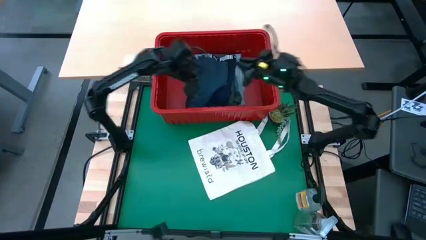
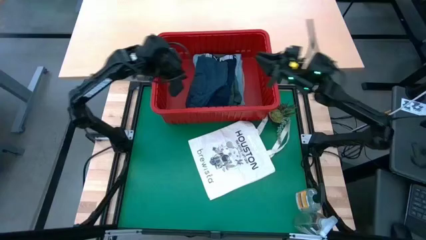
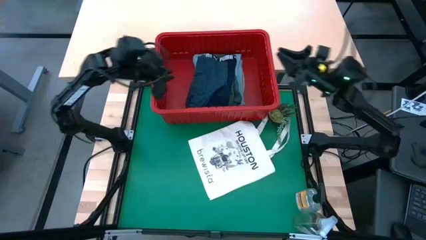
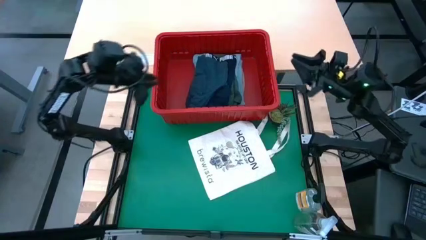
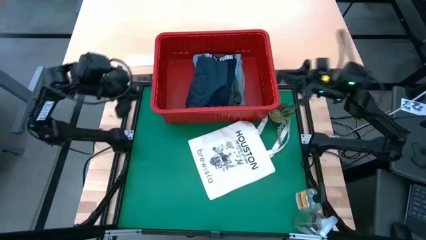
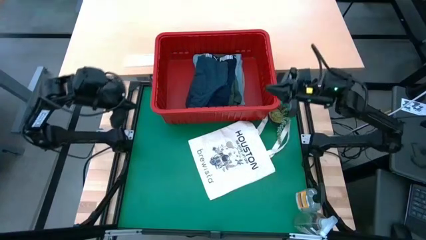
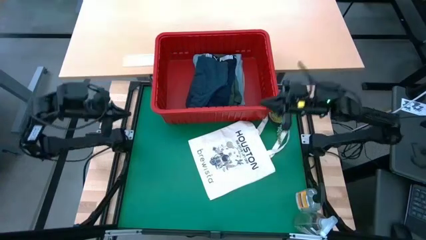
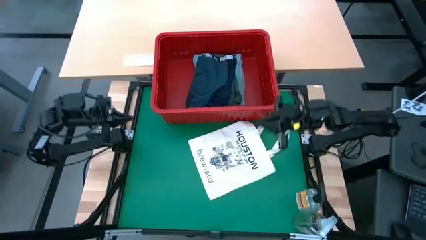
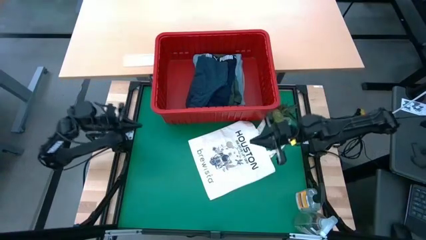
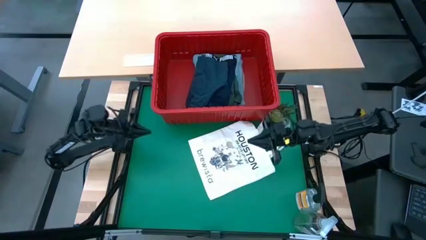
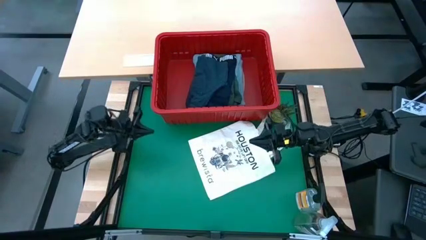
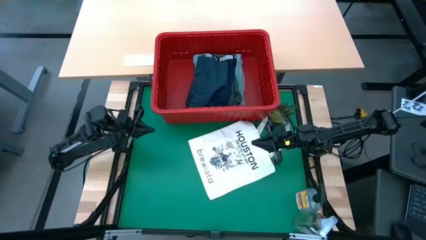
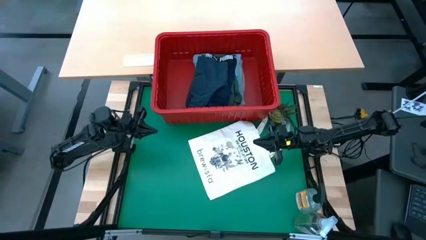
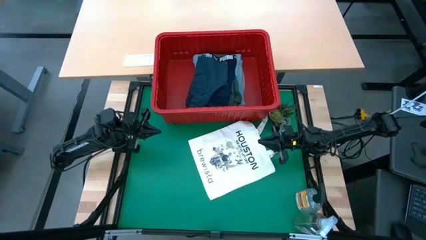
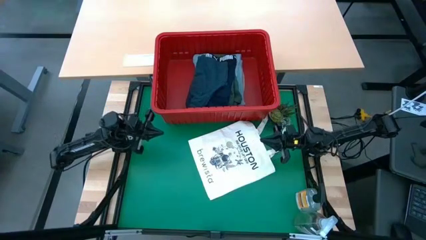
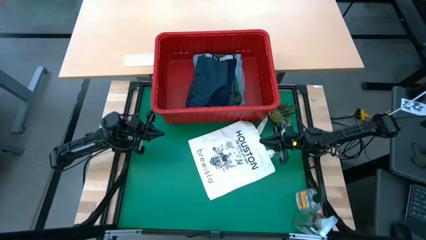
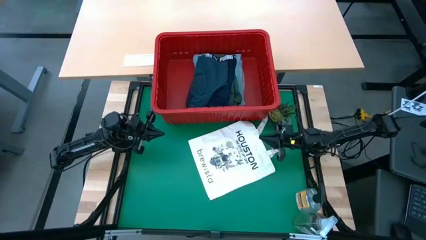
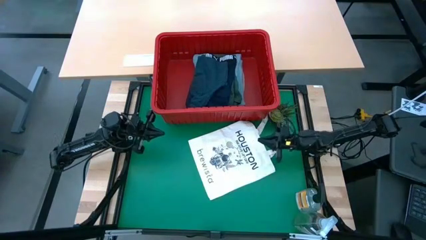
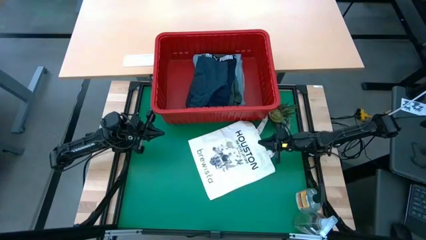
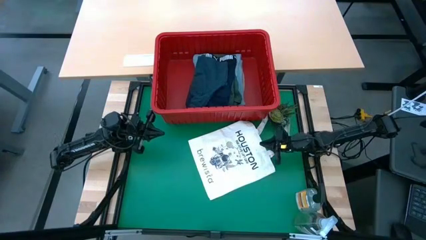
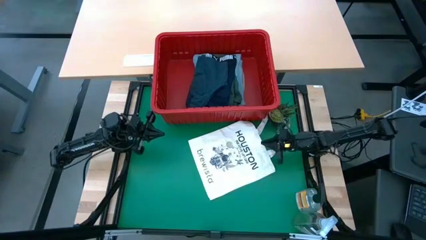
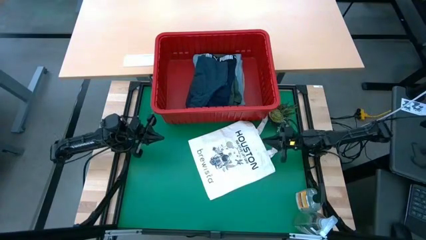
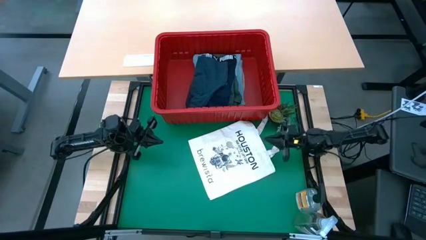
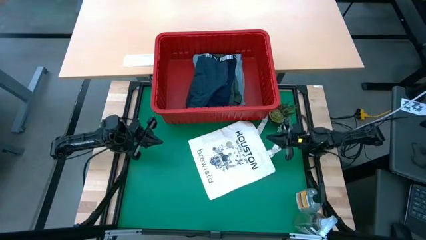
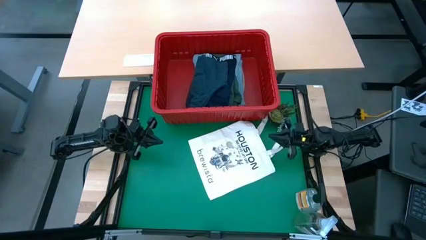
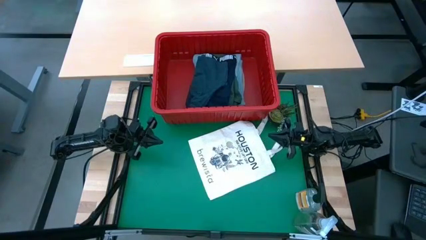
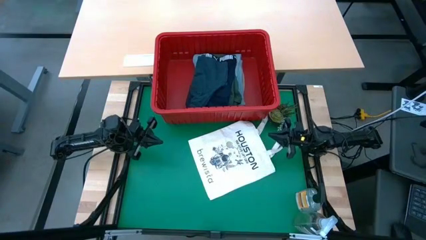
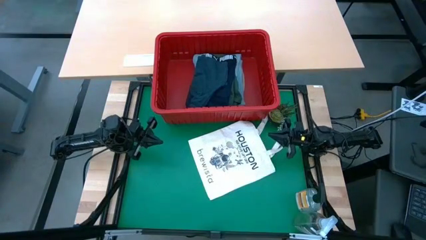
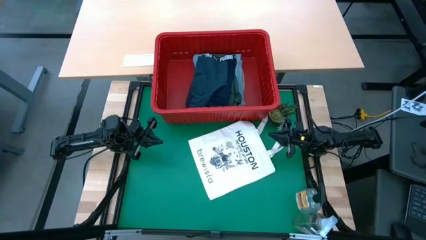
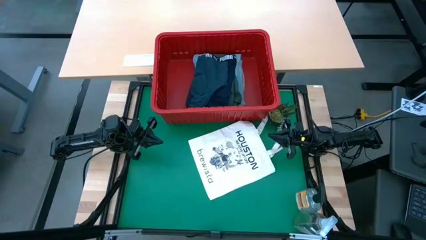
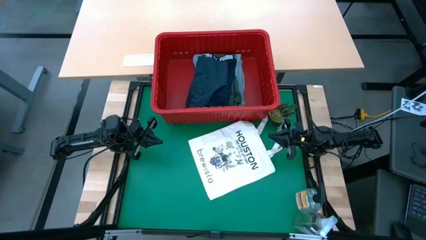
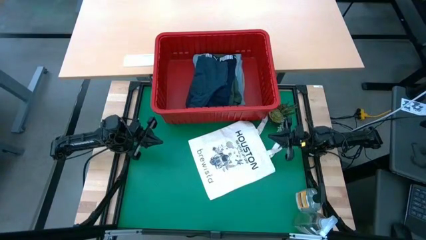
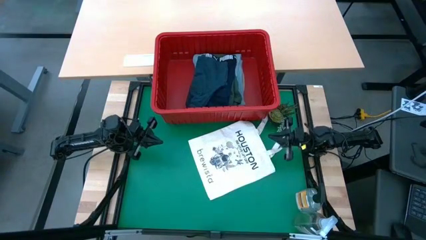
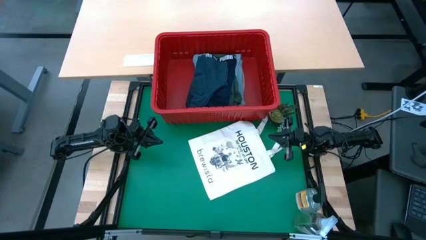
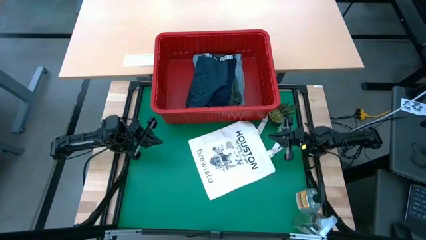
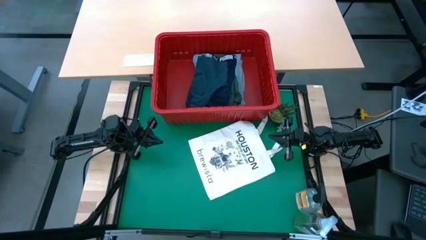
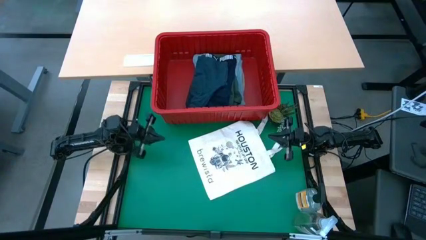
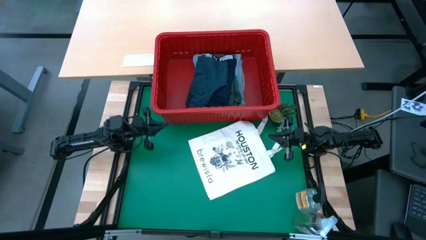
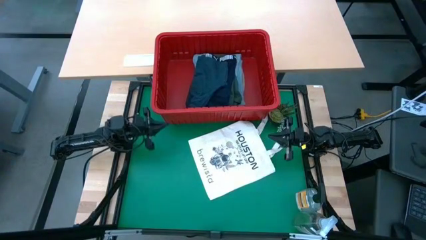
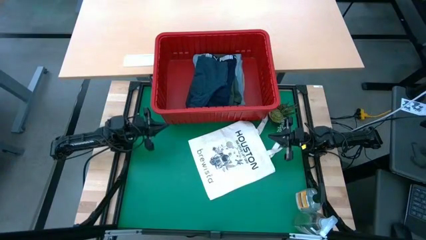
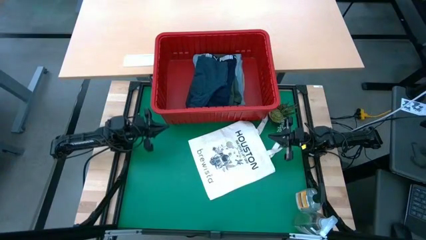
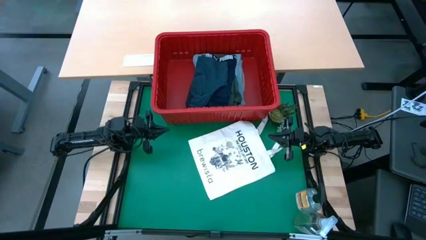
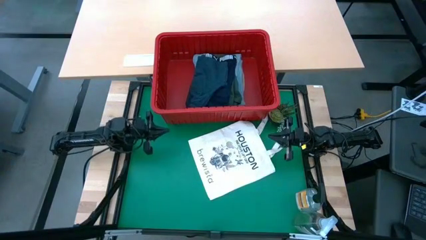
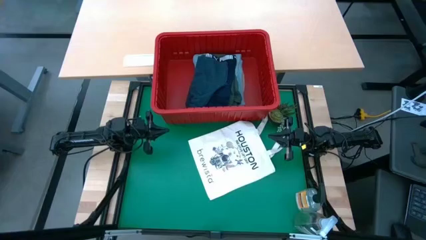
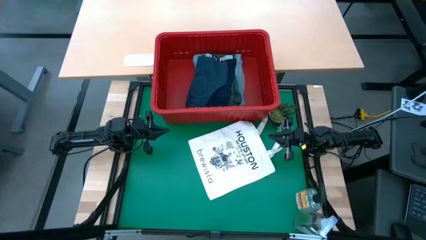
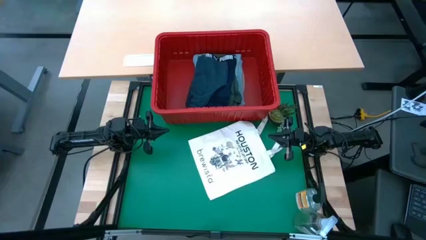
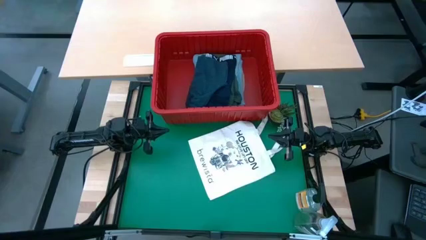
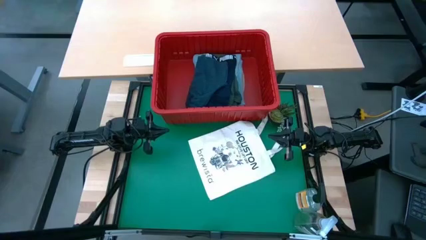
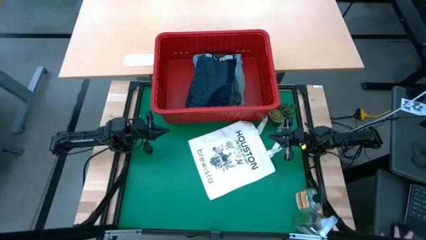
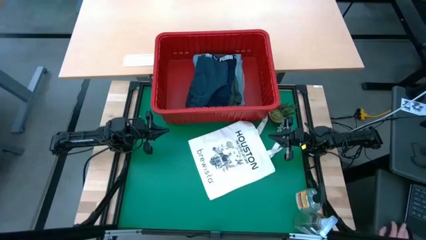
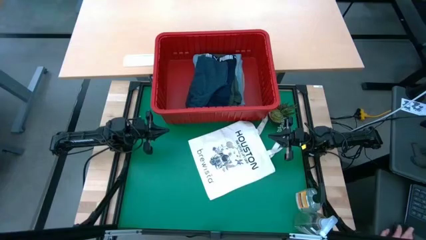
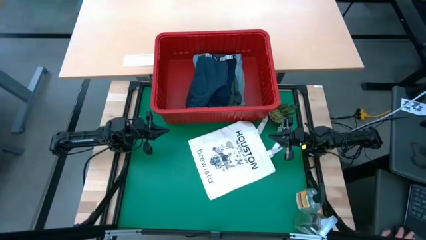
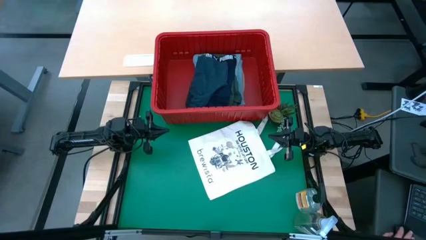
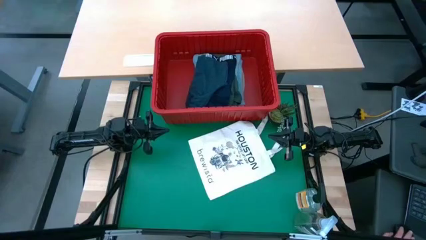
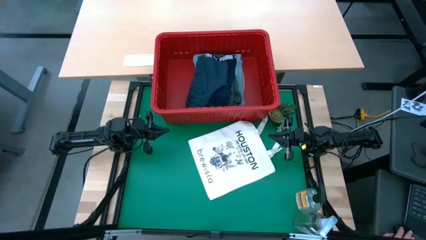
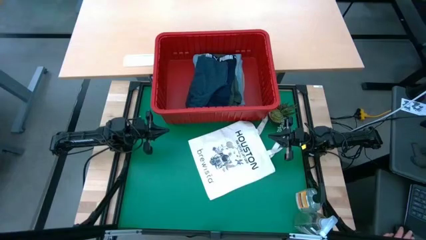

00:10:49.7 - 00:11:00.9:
Task: Fold Laundry from Bin
Return to home position

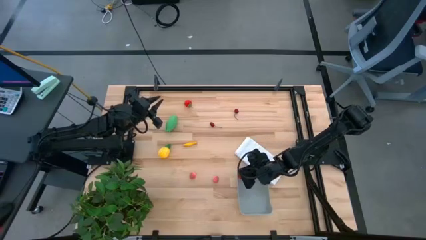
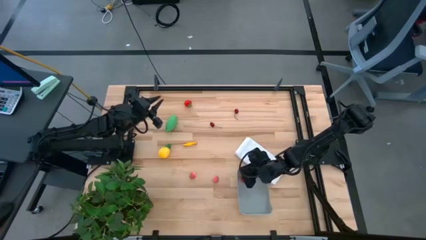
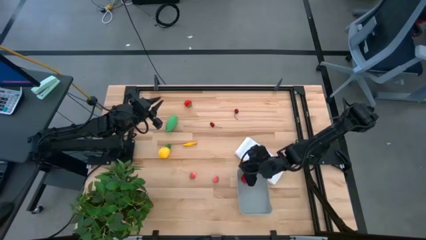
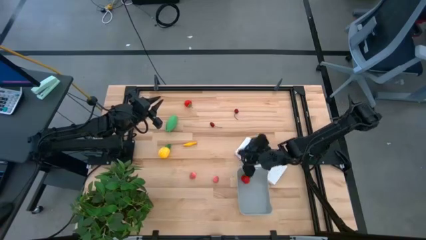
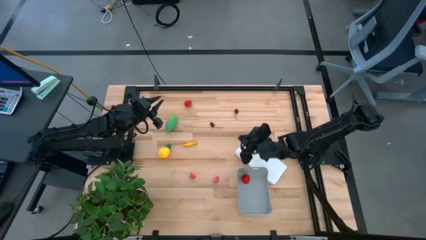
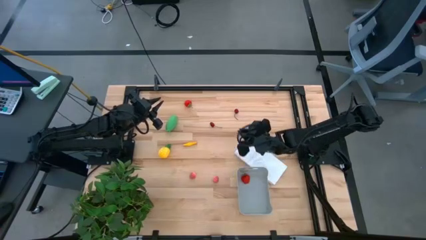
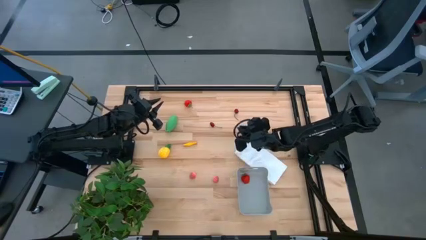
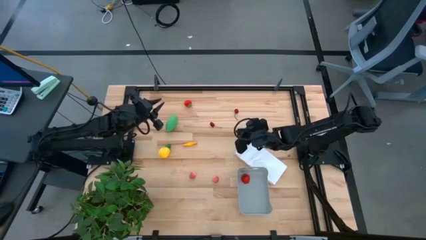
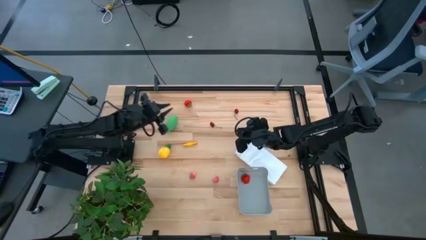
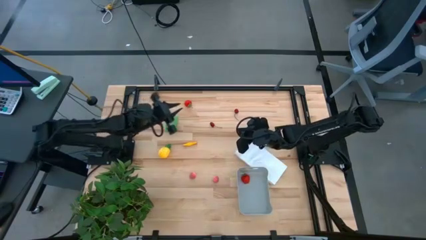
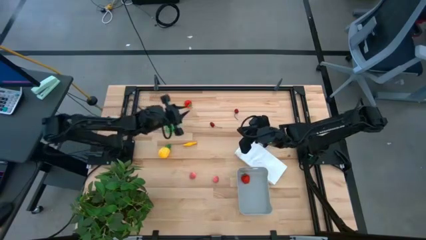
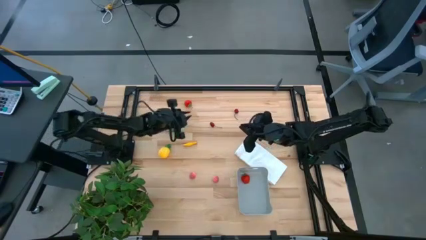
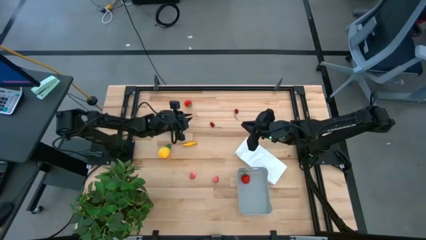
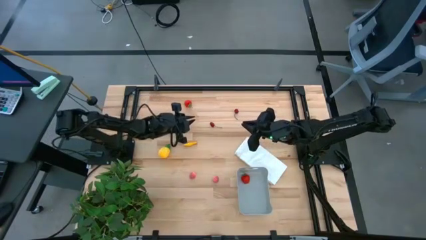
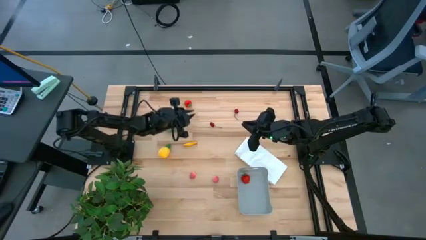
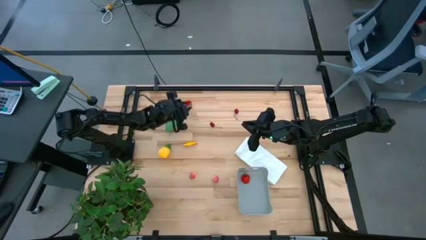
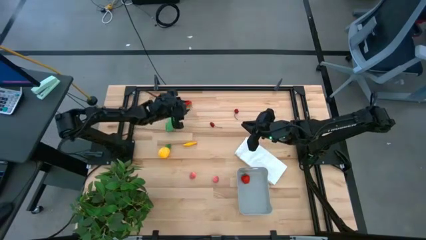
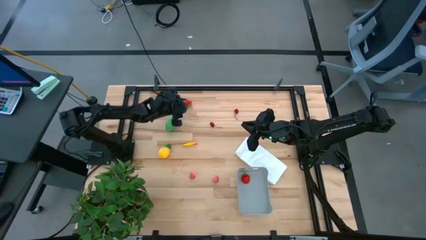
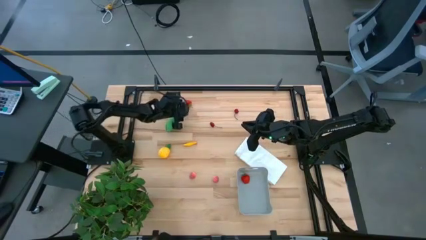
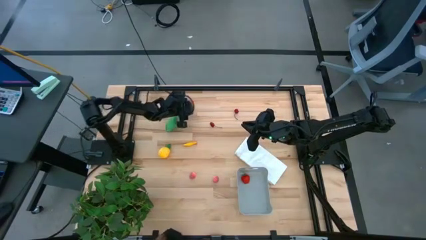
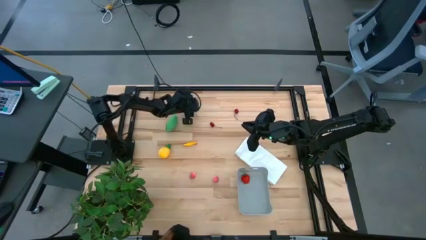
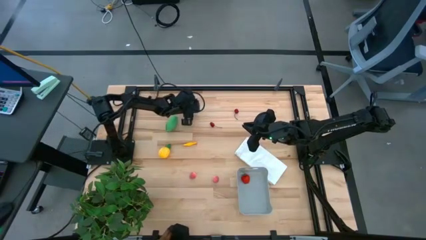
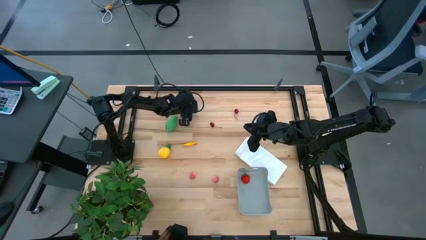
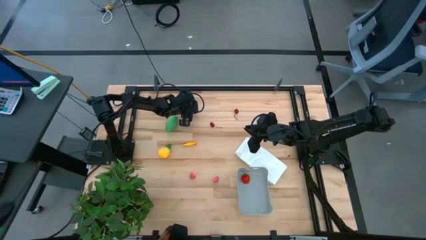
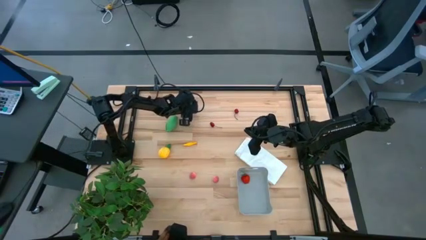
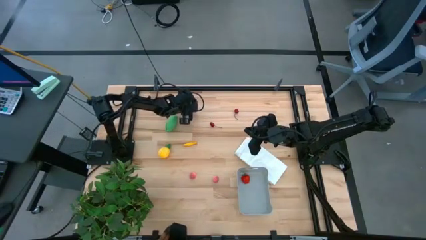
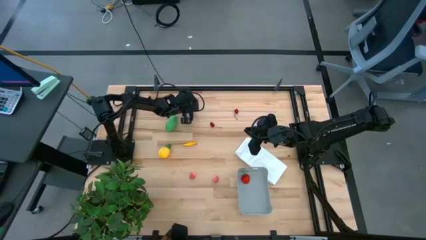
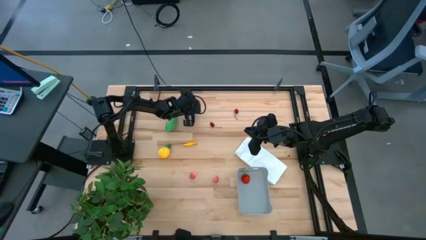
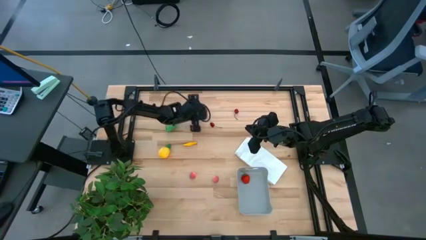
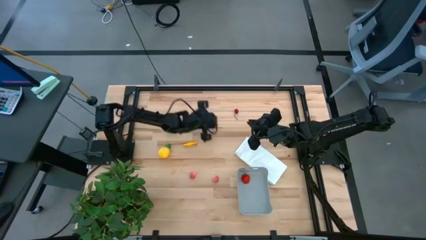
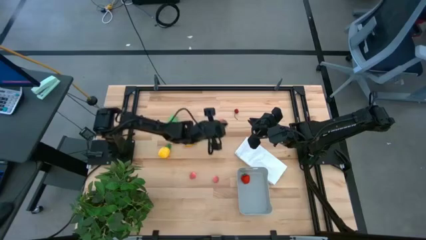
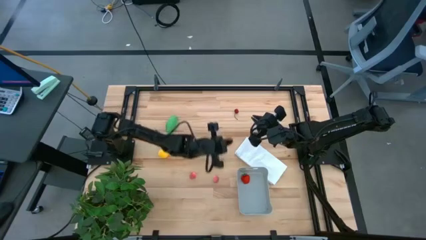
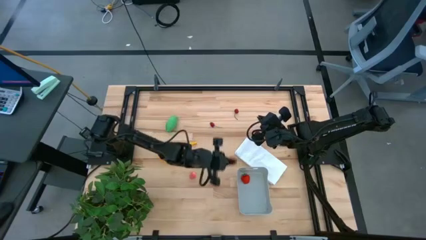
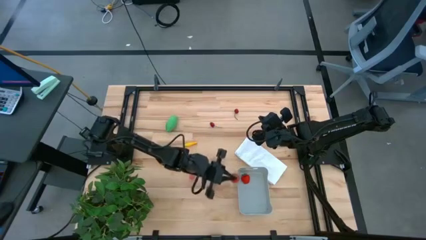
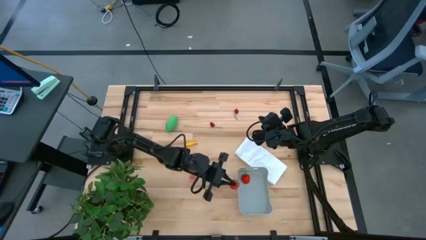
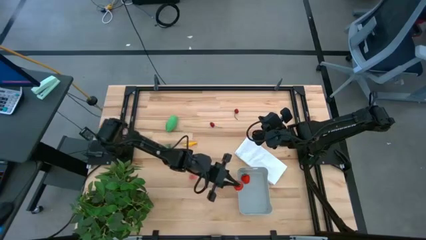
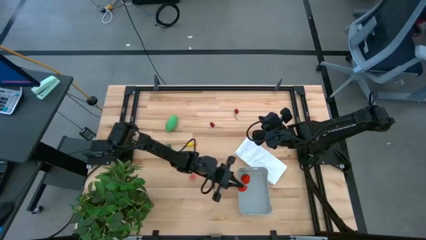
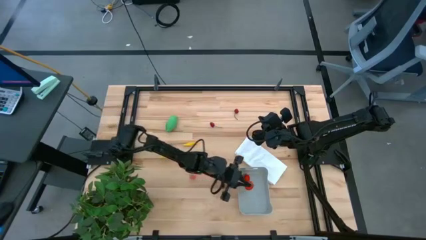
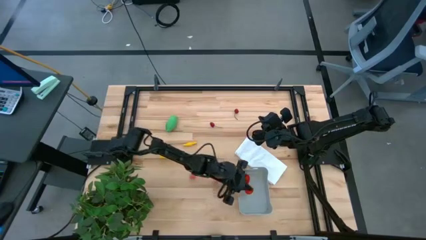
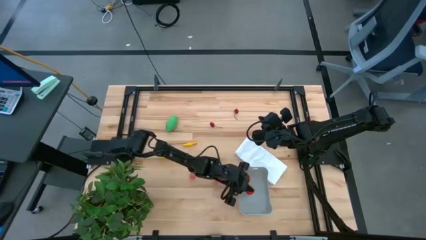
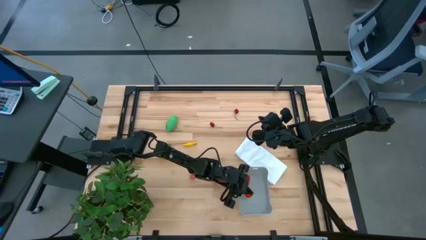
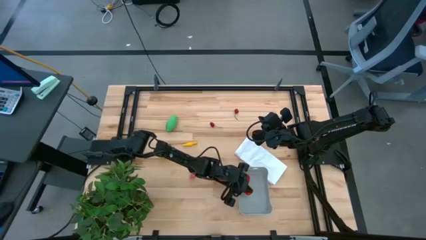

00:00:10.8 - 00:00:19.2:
Task: Pick and placing Produce into tupperware
Put the red strawberry into the gray bin
